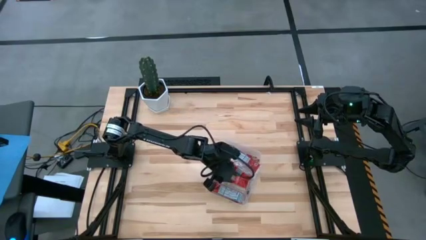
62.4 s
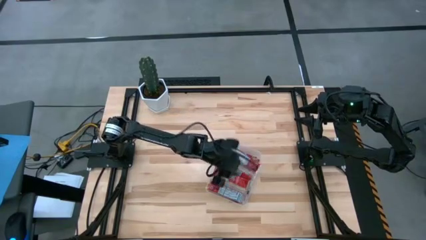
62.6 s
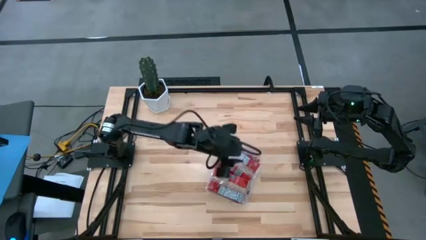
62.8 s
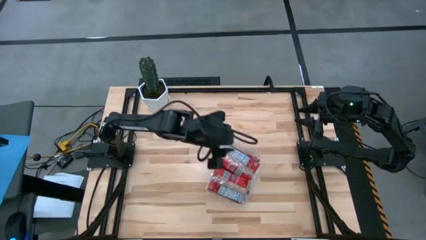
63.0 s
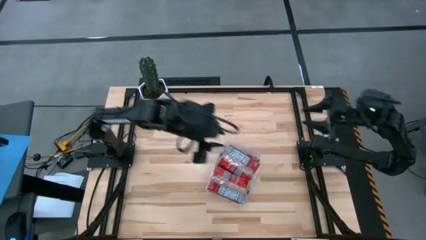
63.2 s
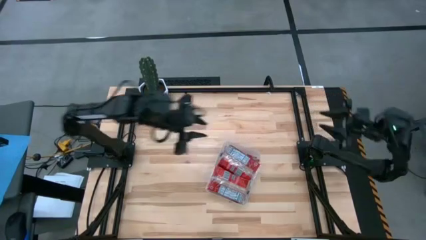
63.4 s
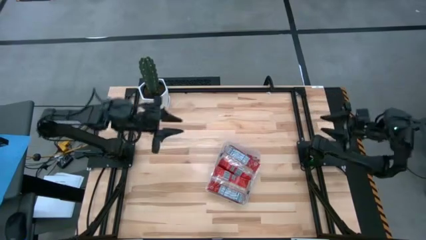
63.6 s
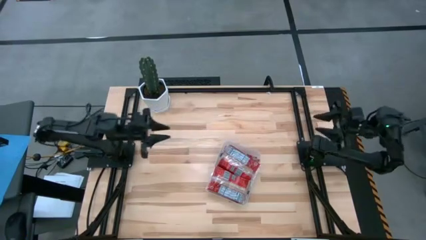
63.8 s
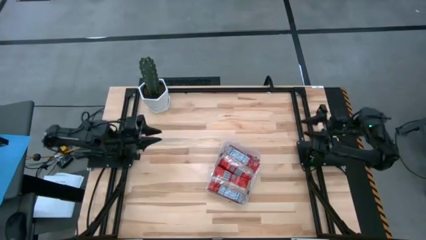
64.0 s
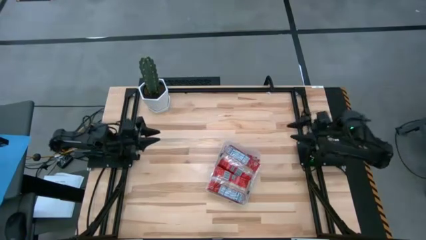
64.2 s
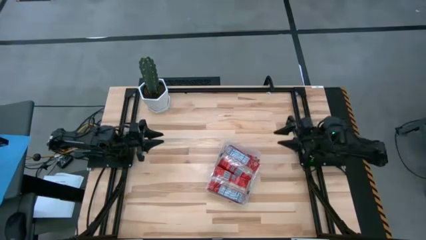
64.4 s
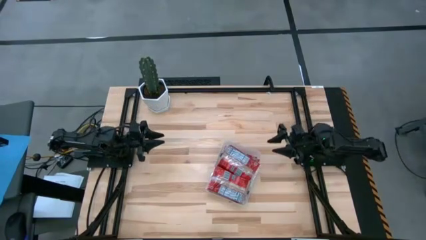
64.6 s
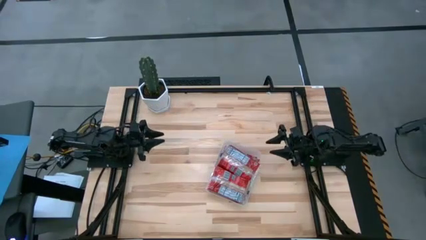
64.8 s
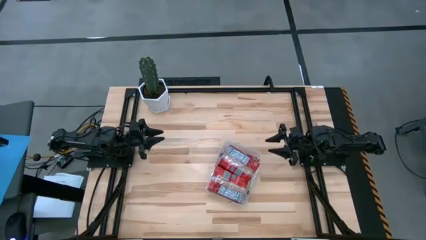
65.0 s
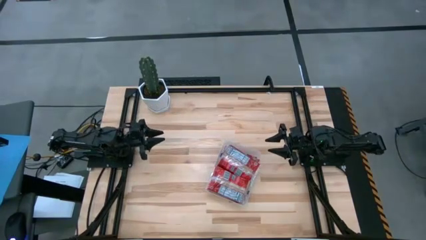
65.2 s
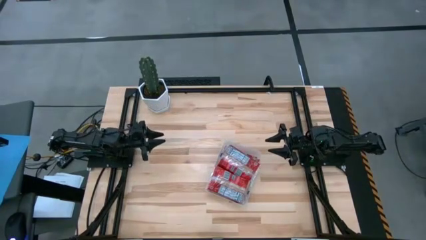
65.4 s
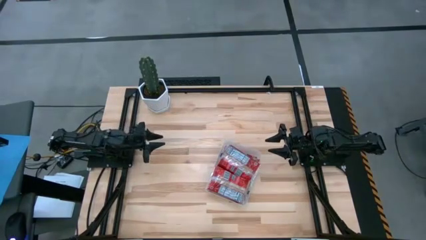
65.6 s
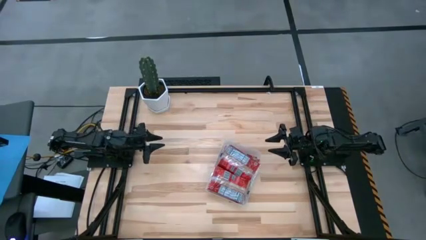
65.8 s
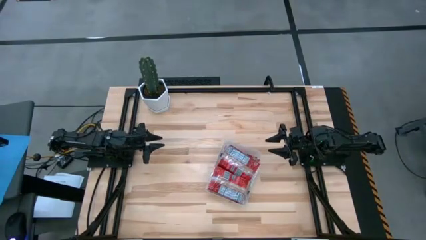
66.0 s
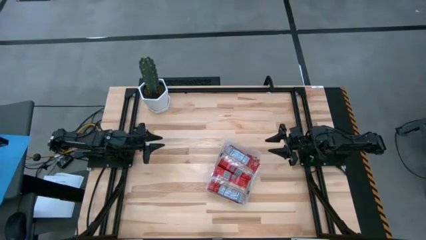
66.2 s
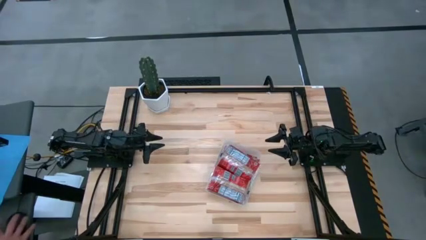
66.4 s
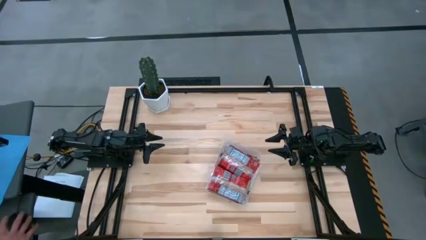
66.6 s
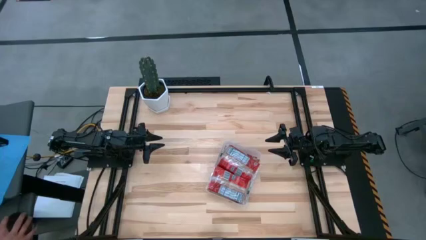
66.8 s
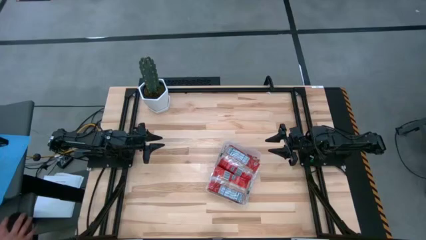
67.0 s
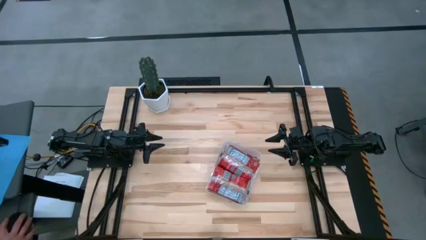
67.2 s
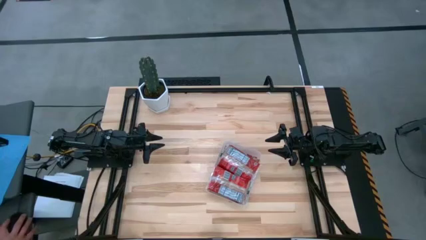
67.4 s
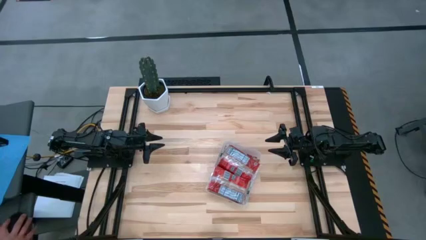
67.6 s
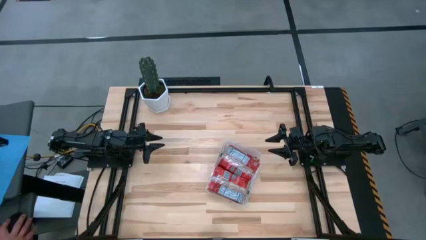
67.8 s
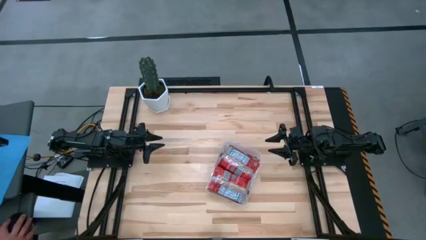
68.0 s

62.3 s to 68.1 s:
Task: Sort popcorn bags into baskets
Return to Home Position

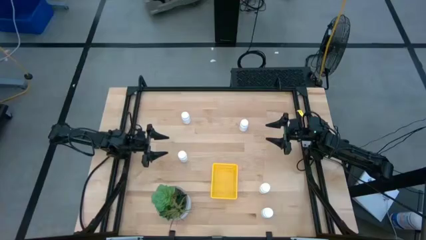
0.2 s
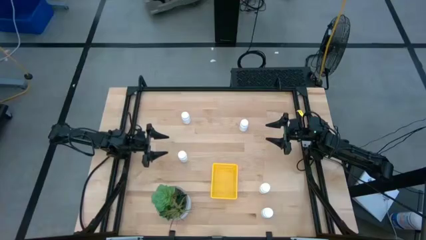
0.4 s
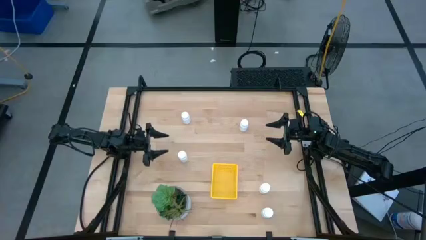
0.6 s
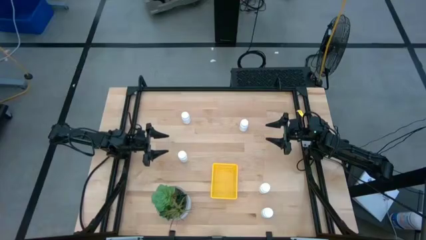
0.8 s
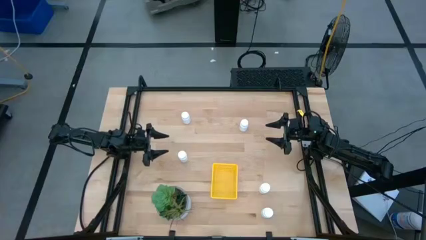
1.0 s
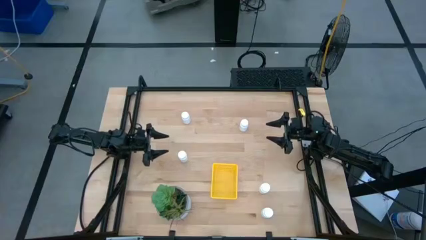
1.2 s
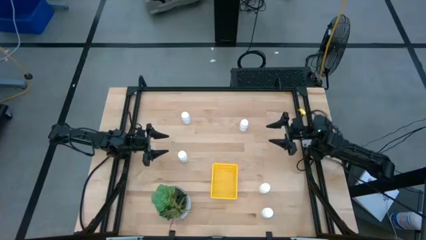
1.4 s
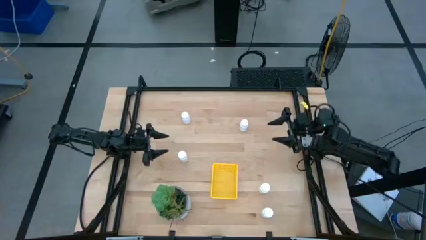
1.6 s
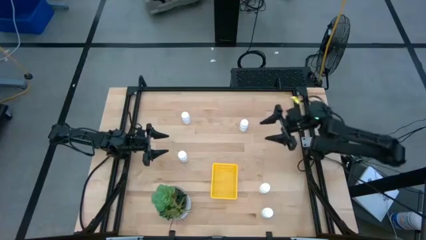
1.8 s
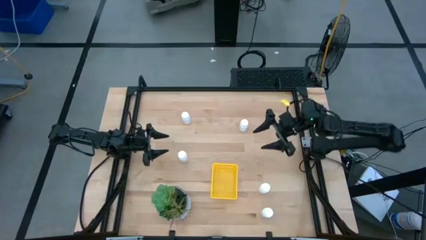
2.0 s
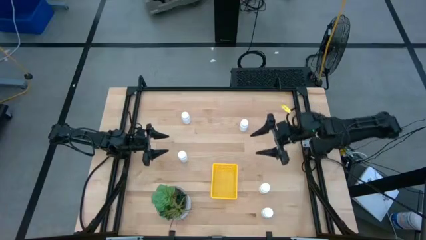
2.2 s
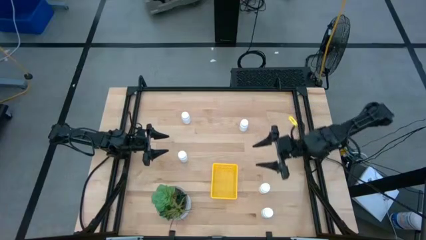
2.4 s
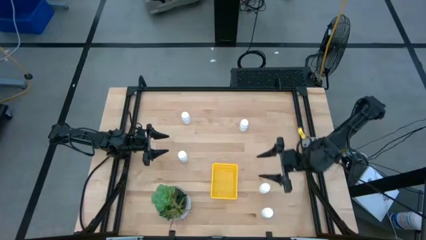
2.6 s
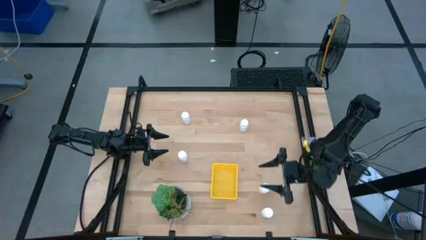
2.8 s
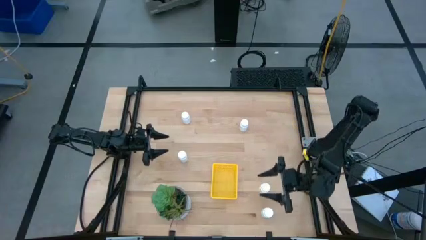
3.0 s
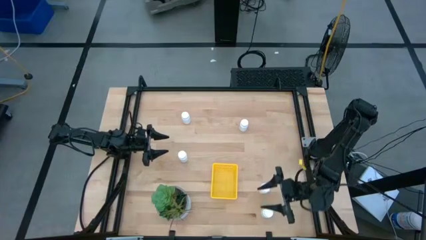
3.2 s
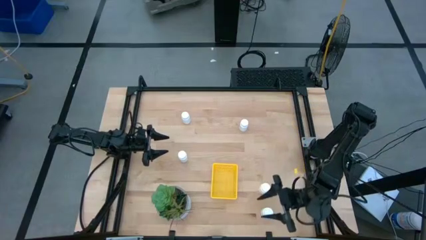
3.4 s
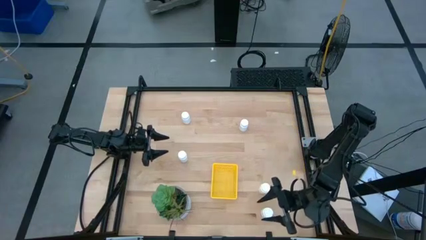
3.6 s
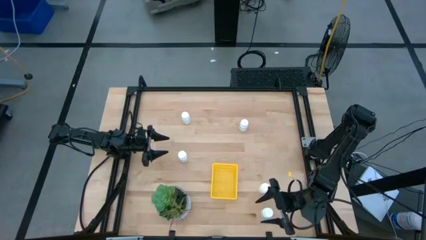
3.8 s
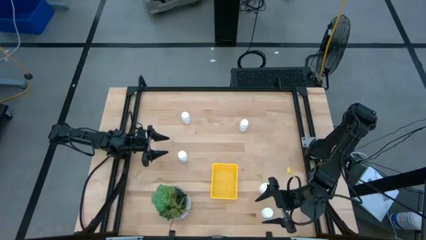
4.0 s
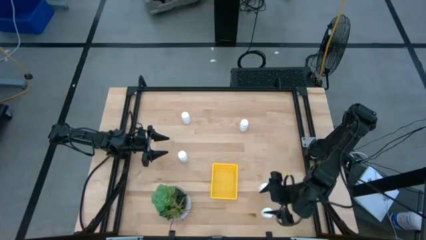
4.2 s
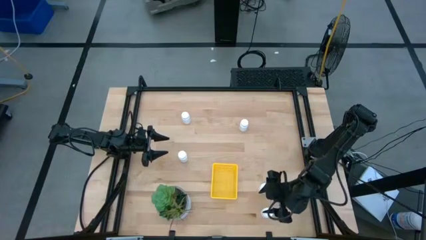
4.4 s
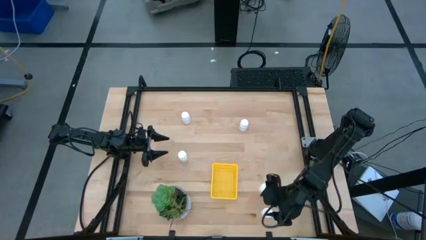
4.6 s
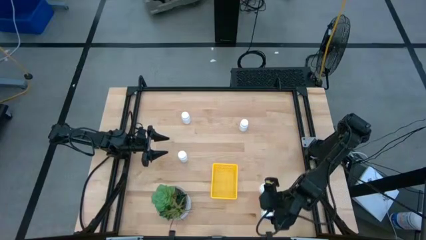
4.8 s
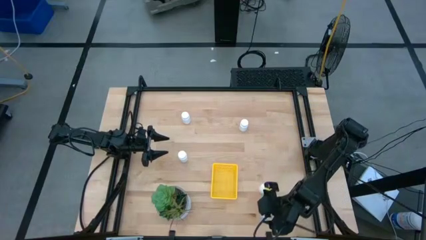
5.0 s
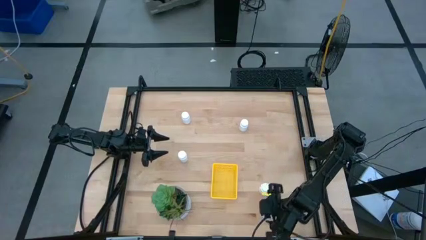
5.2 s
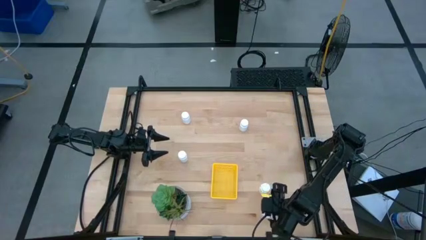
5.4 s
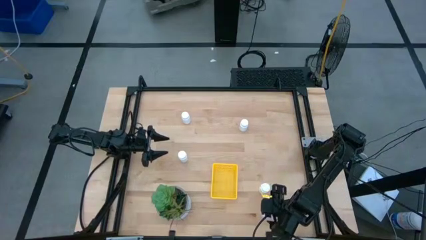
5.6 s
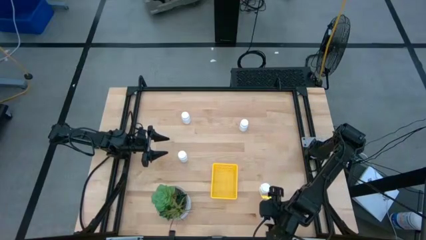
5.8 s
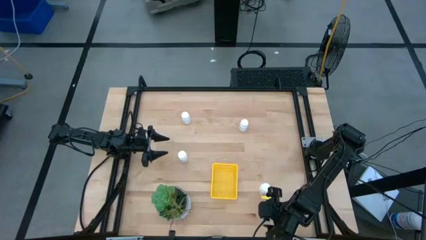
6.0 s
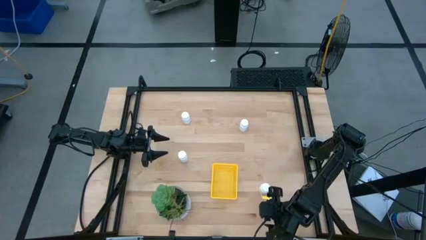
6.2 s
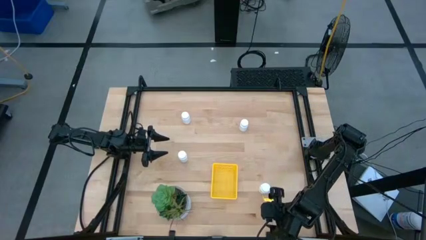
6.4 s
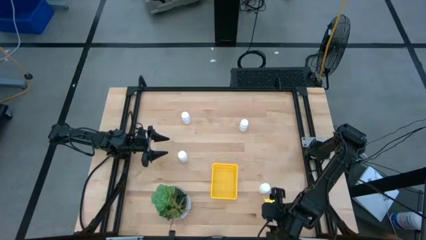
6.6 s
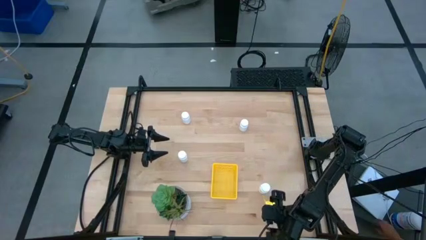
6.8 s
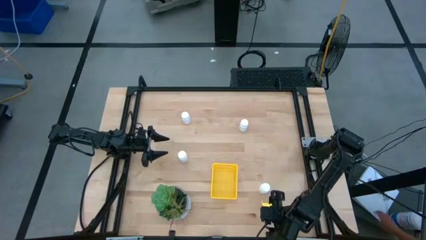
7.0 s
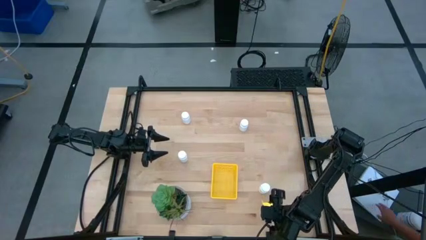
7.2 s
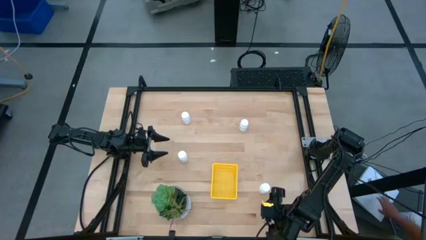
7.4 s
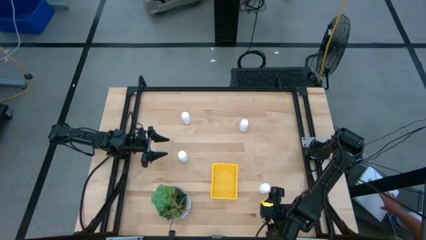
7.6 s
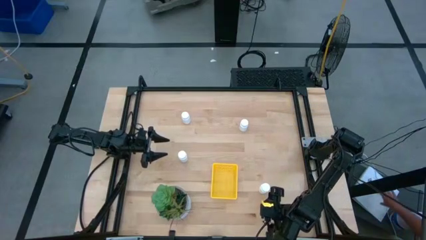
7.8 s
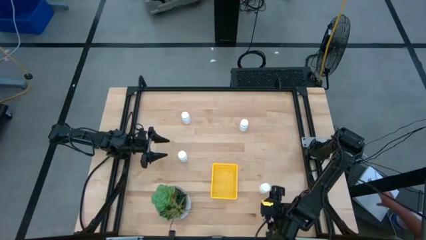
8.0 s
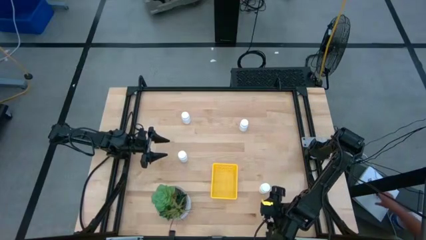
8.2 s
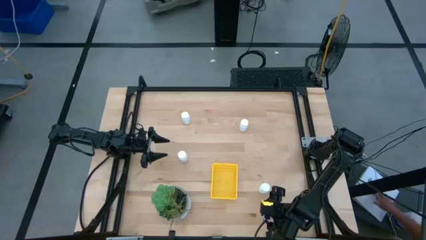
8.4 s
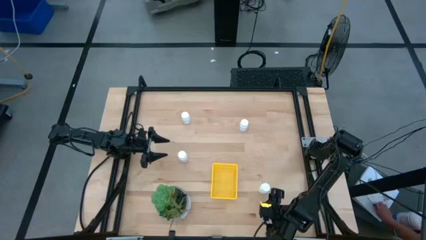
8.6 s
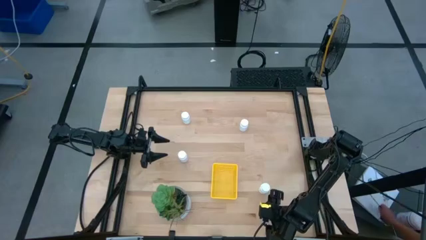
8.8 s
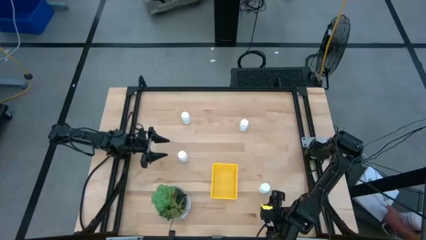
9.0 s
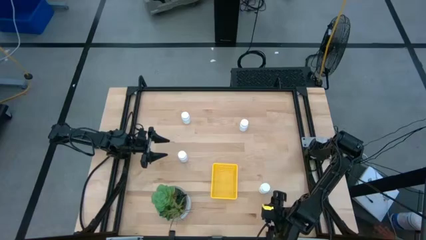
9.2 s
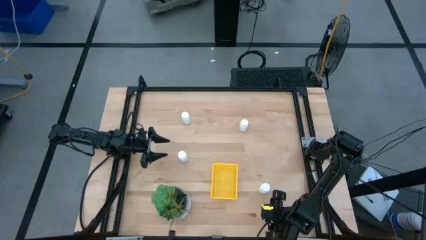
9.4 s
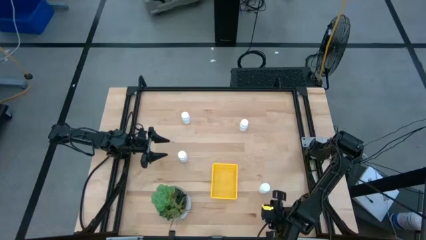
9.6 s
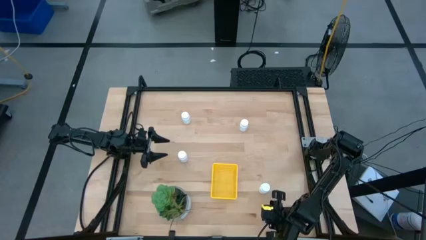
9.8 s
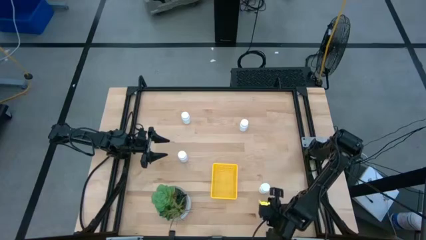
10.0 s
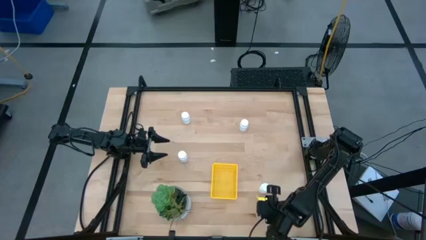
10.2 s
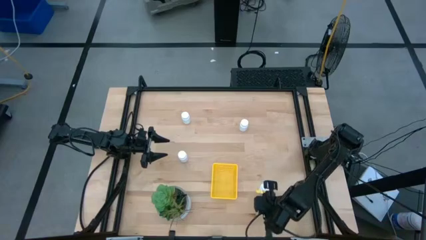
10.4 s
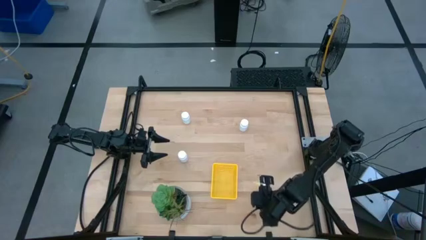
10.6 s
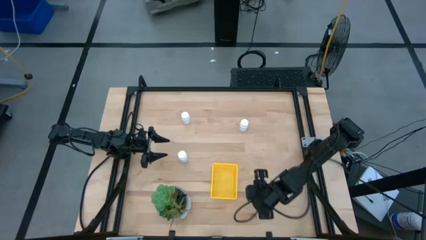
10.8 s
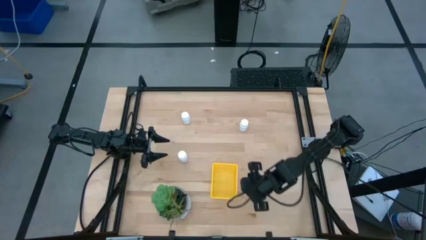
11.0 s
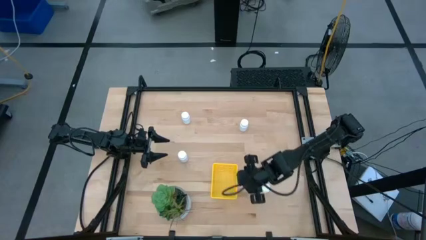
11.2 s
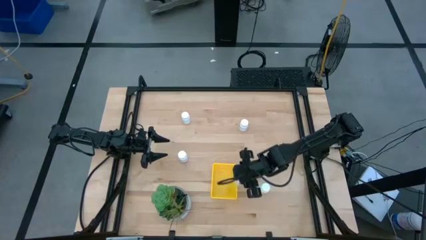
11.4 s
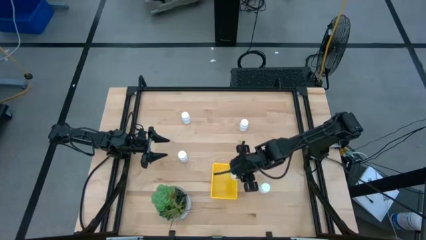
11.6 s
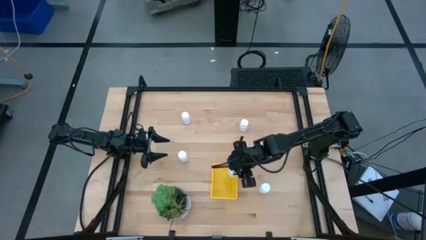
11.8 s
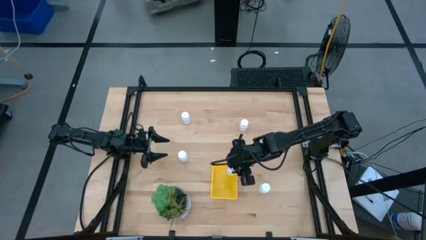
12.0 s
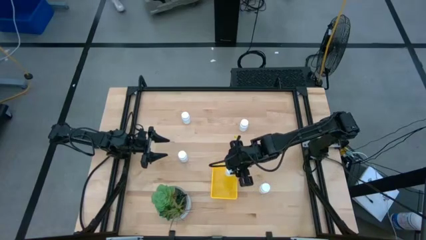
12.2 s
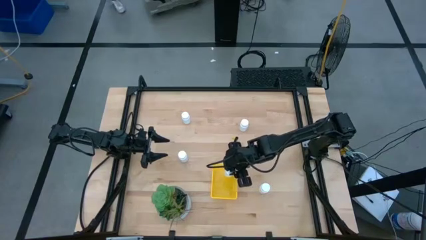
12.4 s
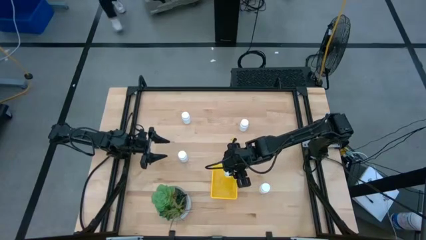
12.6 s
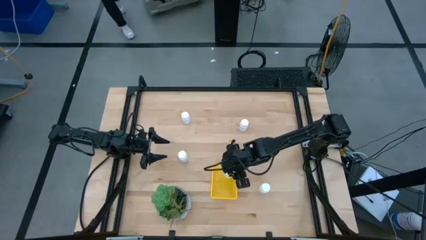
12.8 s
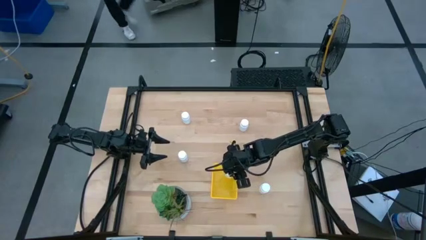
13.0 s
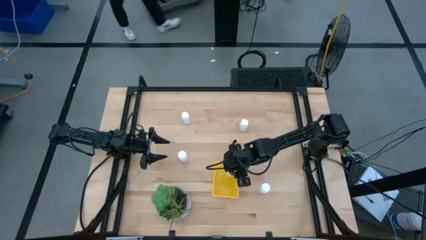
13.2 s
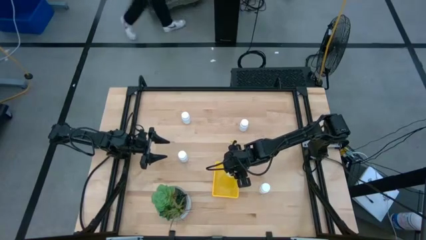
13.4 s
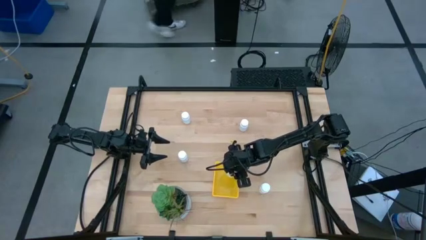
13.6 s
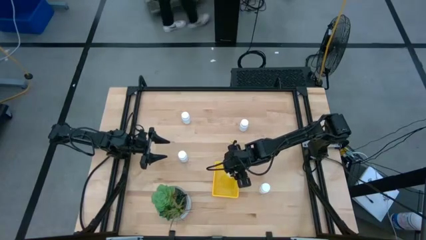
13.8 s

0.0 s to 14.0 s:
Task: Pick and place pill bottles into a basket
Put the white pill bottle into the yellow bin
